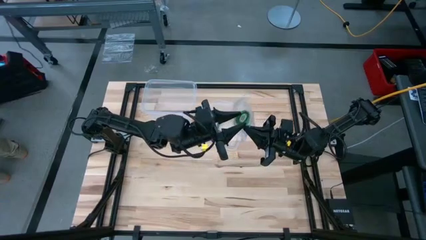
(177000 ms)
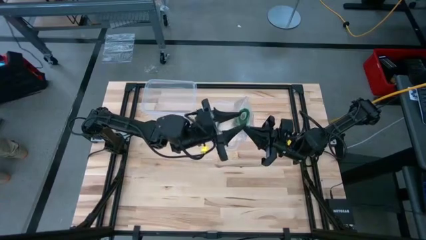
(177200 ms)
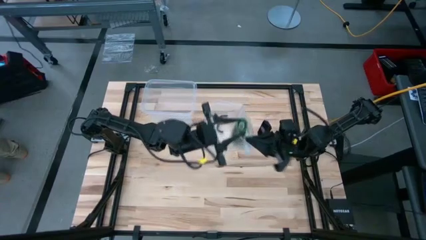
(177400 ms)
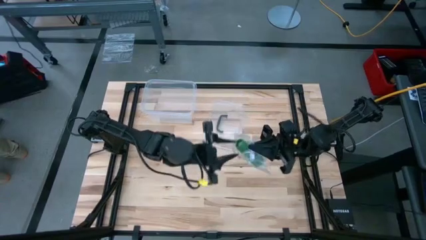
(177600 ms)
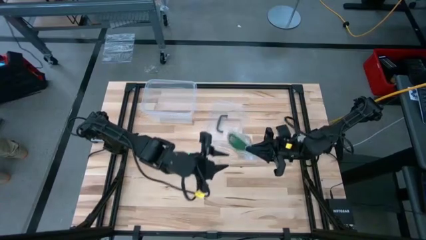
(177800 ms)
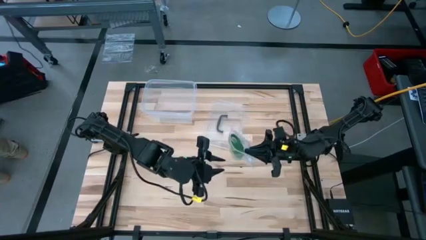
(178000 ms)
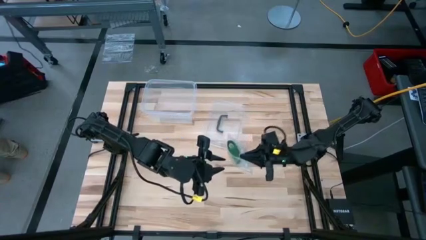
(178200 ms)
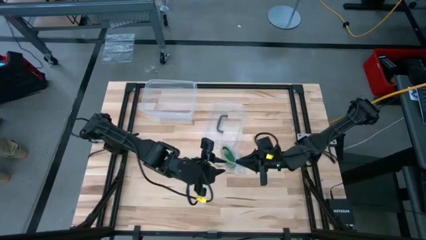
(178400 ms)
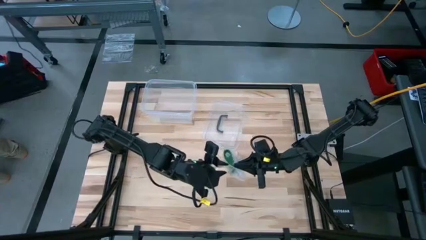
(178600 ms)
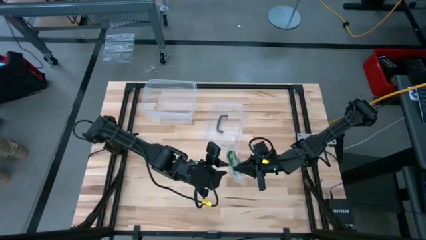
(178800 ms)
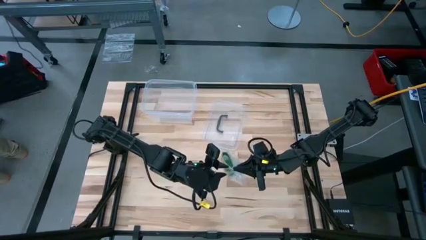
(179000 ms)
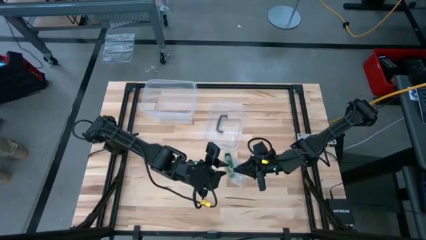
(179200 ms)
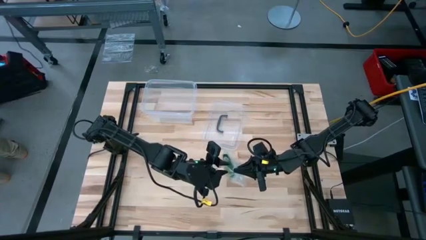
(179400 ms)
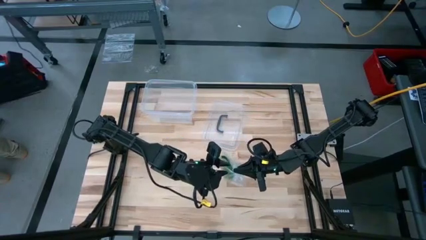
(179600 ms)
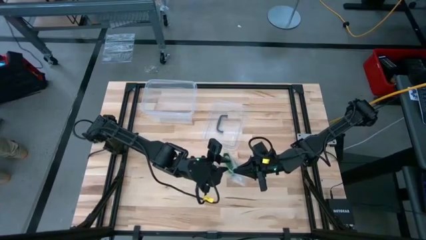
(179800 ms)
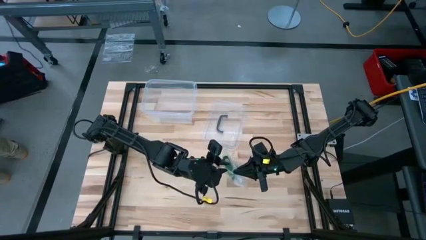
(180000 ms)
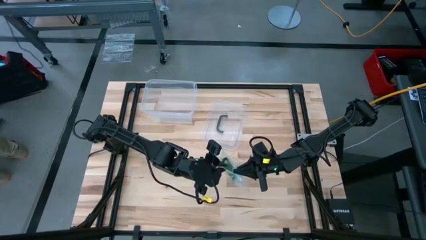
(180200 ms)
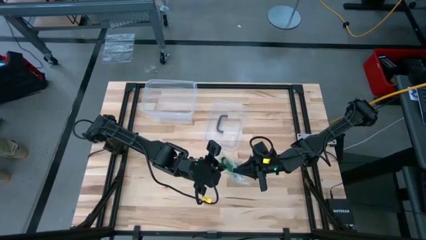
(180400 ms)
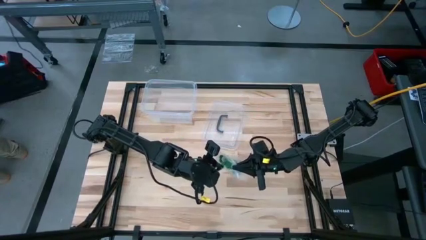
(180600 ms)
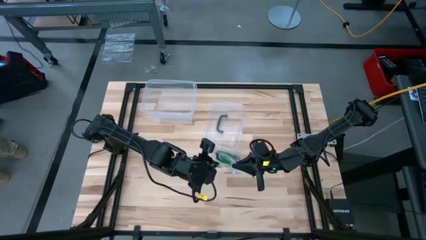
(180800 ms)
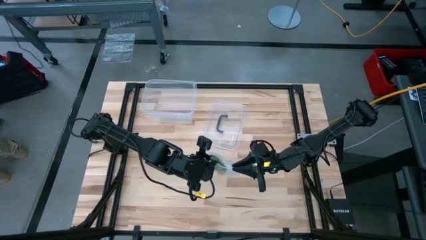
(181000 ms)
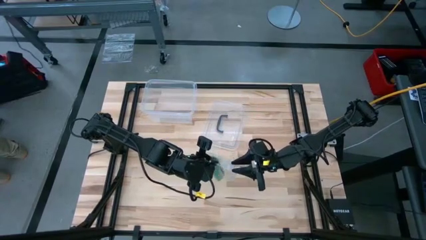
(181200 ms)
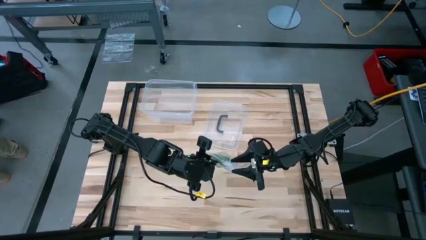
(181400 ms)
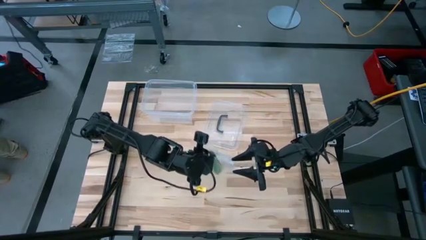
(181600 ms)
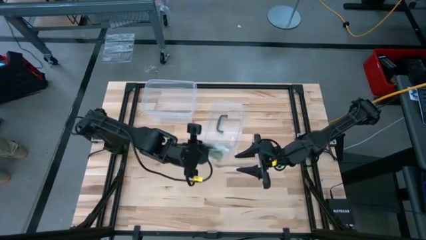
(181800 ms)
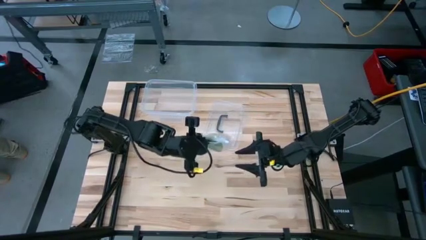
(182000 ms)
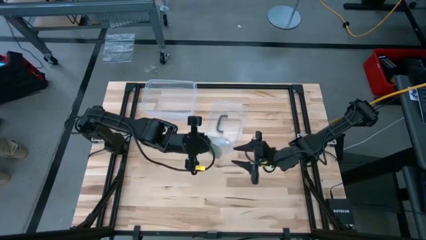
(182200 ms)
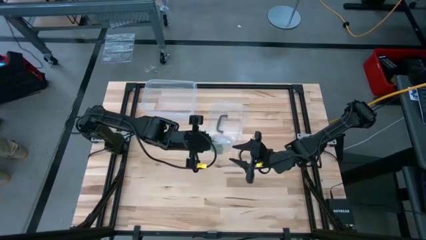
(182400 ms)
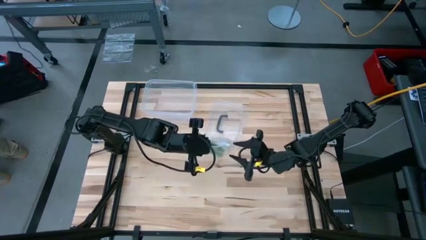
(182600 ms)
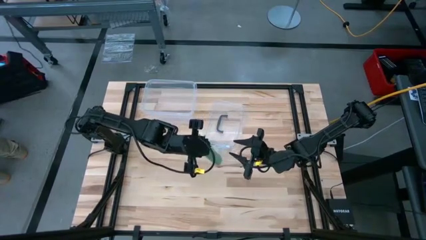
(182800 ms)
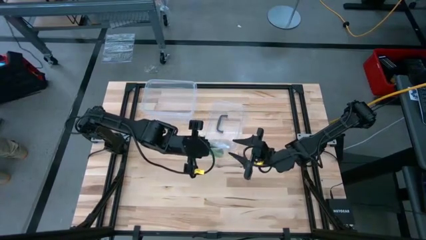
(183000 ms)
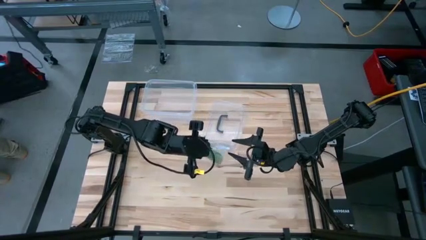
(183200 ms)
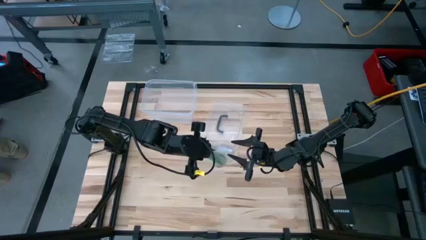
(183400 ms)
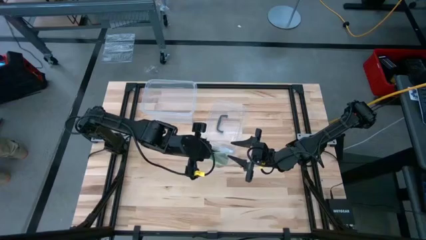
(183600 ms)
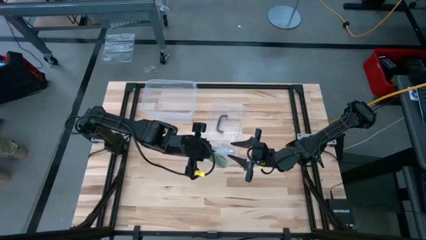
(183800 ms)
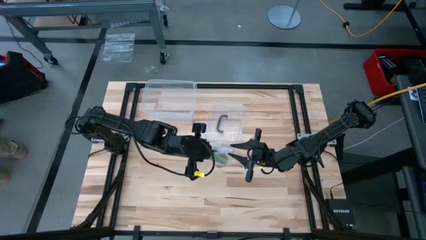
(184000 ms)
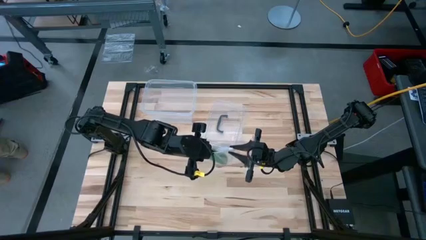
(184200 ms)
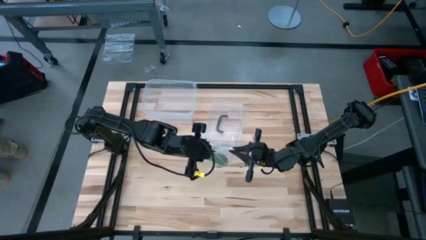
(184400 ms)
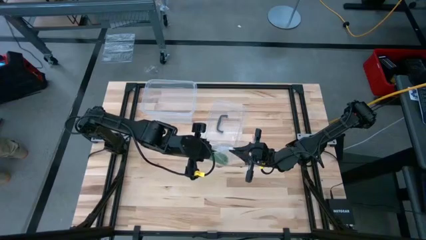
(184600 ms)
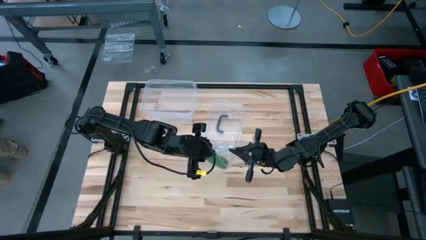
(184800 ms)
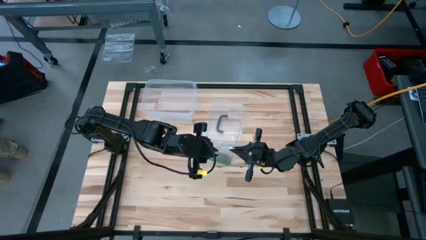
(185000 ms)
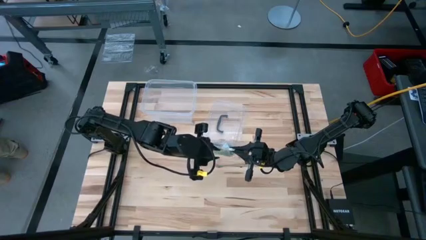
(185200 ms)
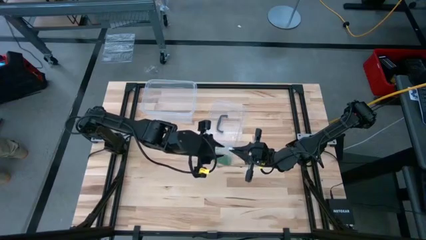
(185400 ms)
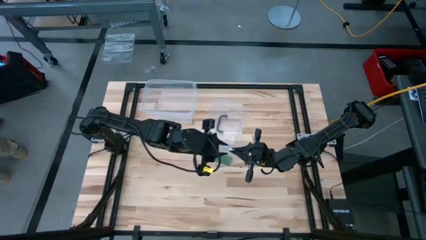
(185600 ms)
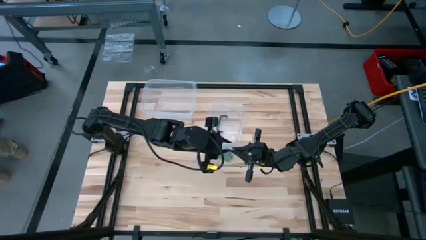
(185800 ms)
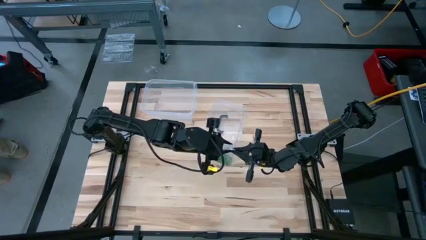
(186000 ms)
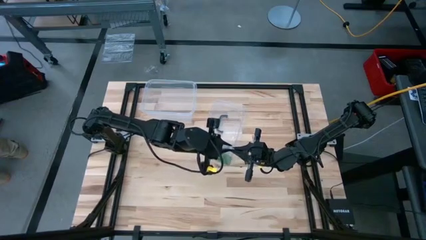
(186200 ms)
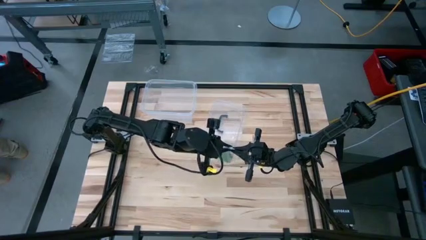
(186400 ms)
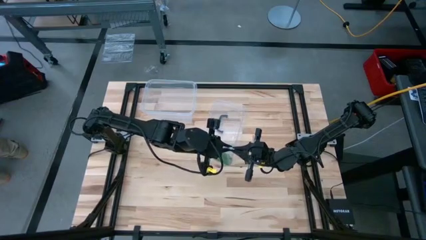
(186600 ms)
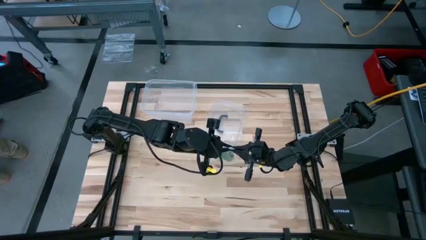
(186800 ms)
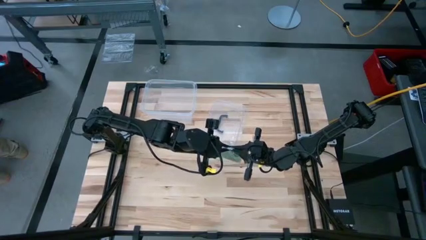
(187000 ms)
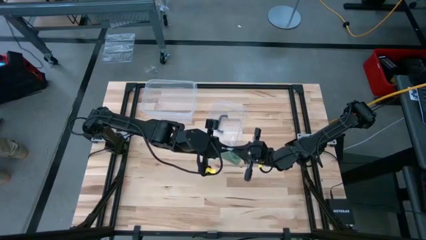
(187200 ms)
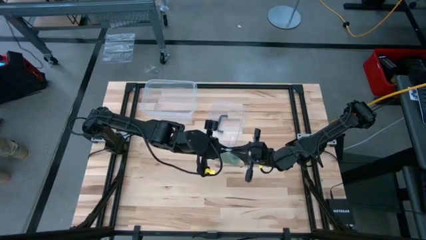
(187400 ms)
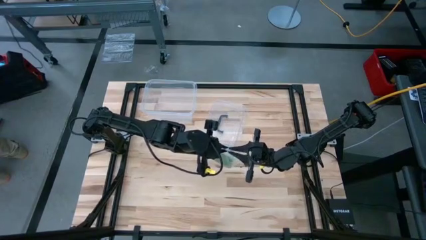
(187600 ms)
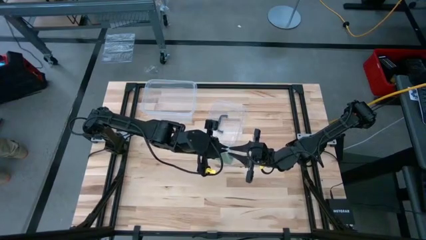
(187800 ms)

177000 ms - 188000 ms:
Task: Roll bandage
Close the transparent zip bag

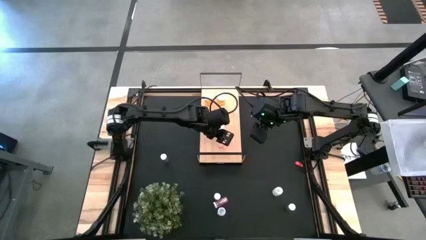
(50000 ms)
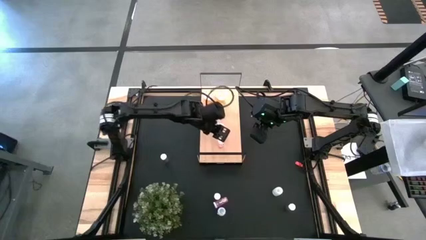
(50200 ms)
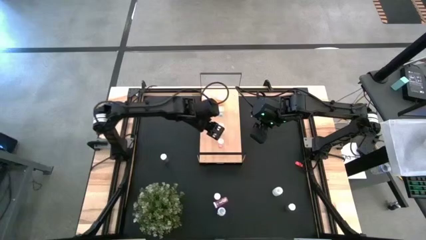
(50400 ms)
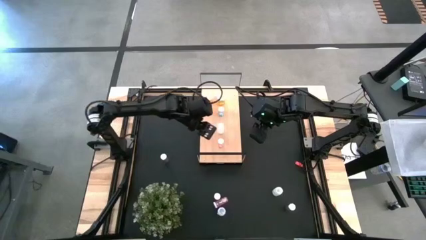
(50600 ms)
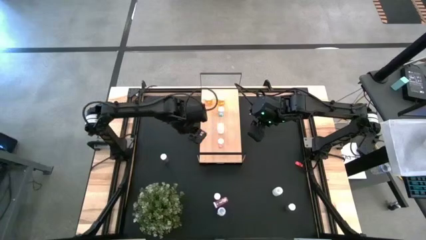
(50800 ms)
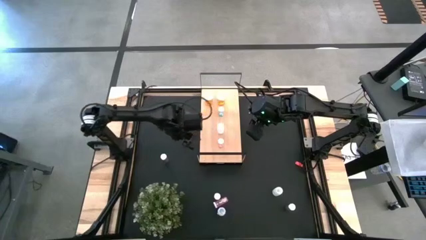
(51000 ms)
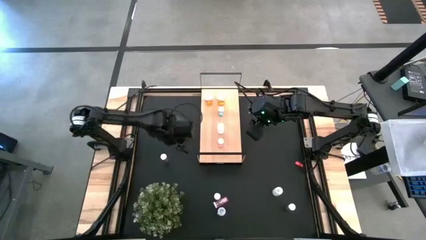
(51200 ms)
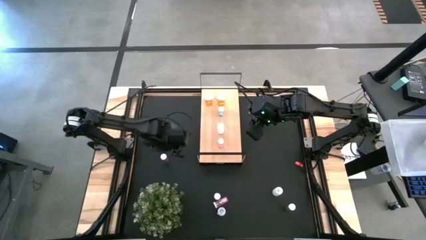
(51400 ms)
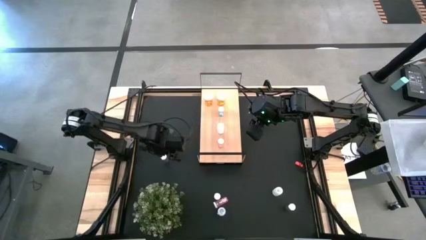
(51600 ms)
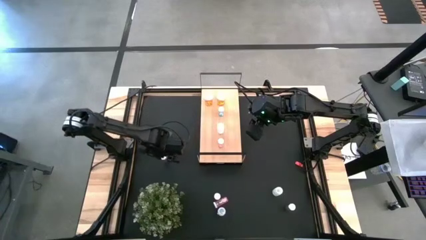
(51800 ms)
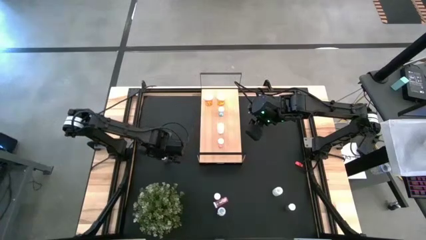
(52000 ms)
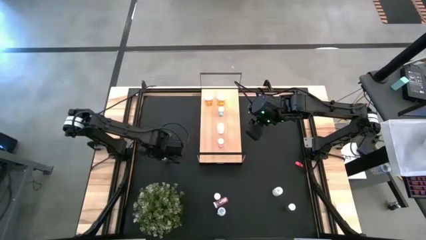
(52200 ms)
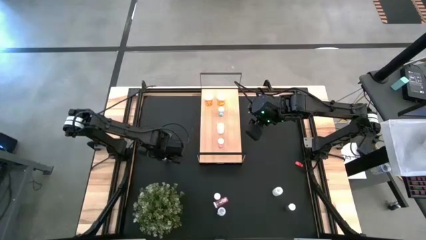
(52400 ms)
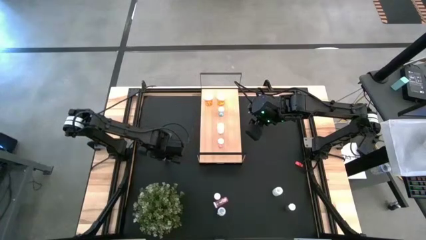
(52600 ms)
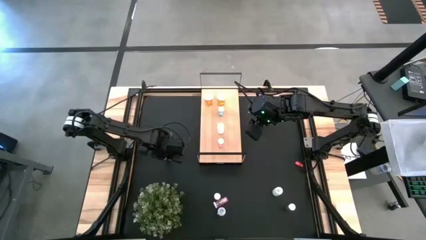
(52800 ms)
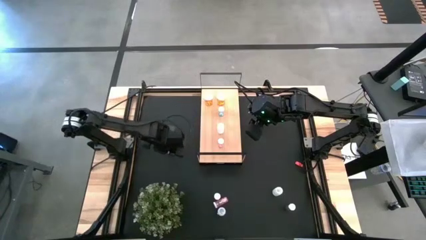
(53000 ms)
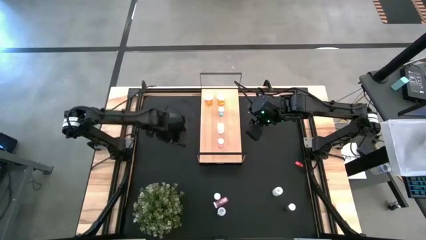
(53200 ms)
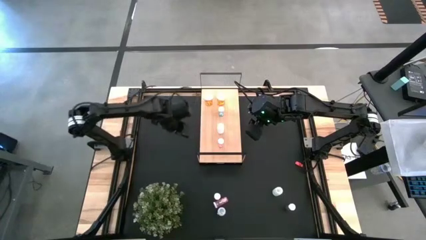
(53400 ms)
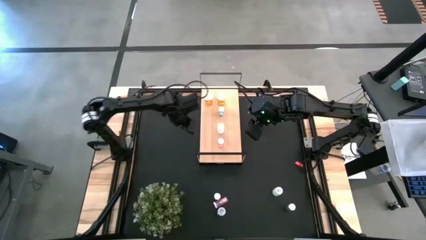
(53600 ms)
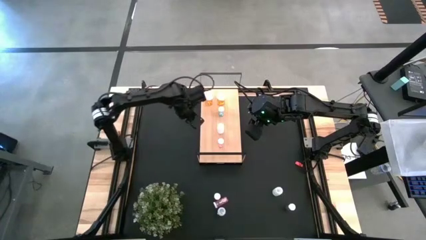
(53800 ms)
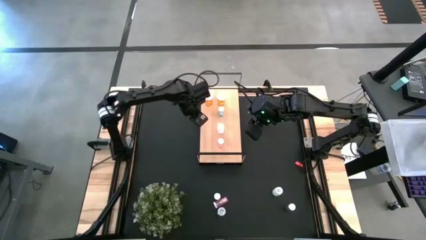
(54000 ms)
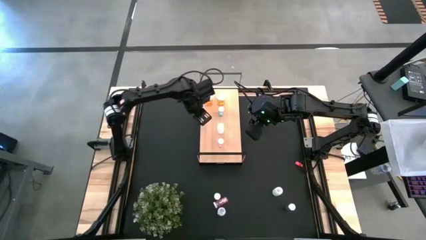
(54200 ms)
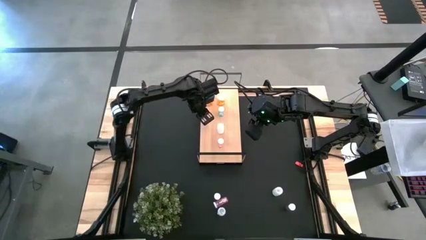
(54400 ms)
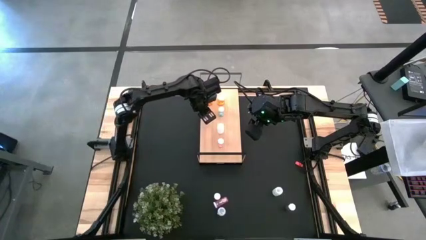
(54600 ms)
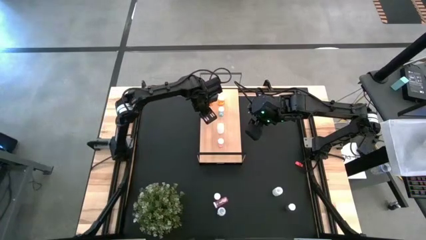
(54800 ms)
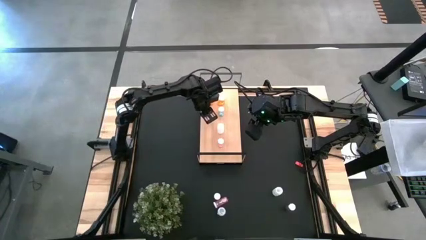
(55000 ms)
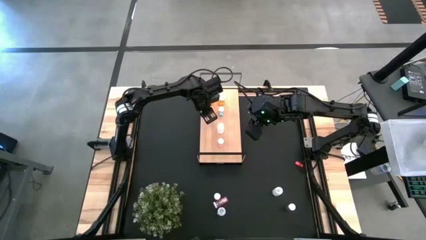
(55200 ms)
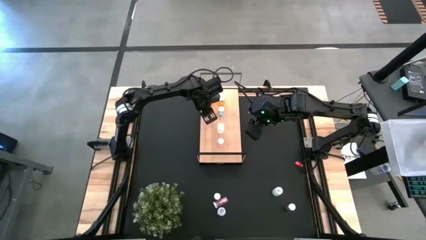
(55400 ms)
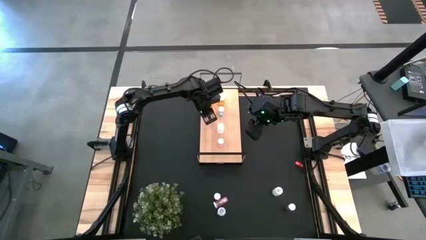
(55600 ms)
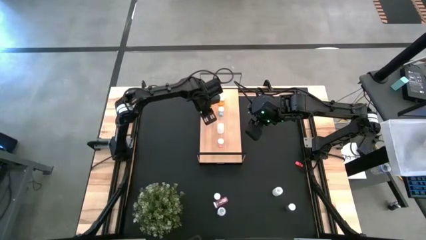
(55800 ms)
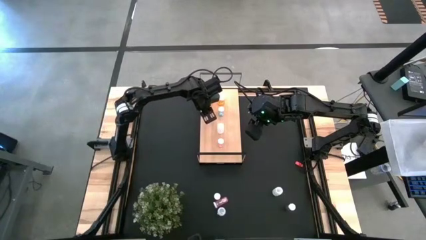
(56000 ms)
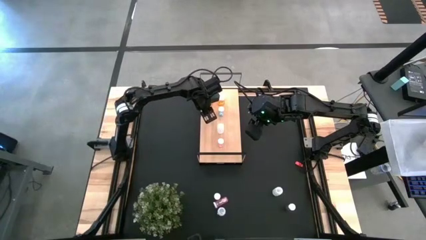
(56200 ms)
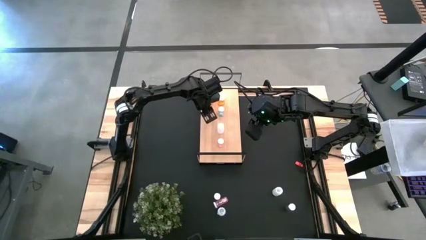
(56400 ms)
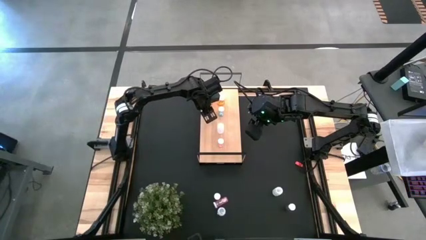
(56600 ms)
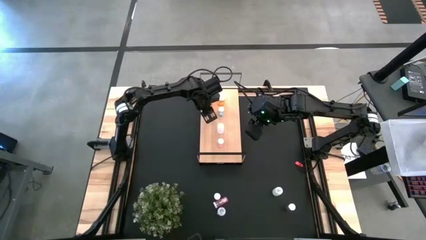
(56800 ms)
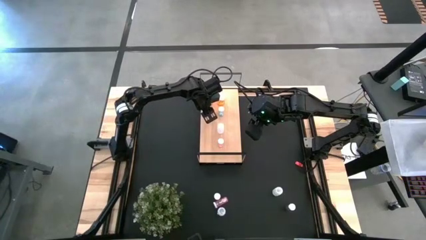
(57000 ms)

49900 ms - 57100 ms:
Task: Pick and place medicine bottles onto shelf by color
Put the top blue pill bottle aligned with the other blue pill bottle on the shelf
